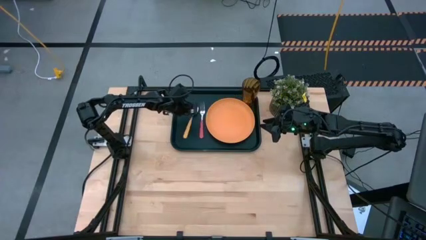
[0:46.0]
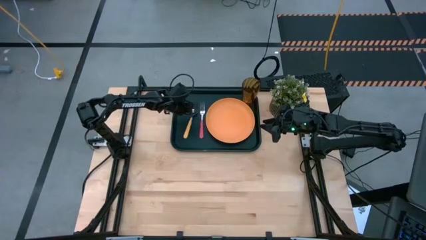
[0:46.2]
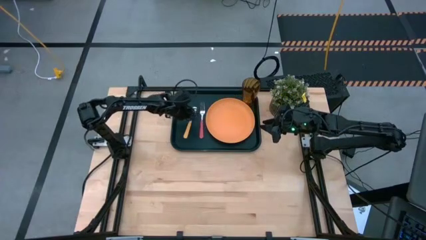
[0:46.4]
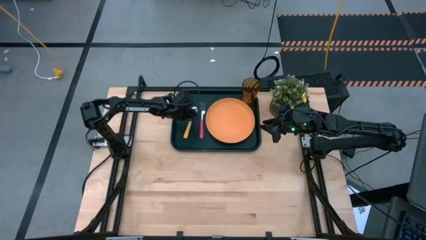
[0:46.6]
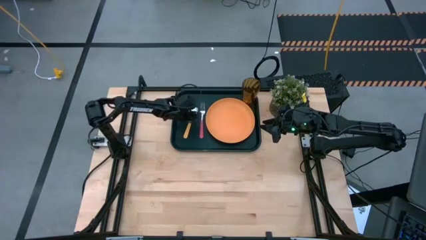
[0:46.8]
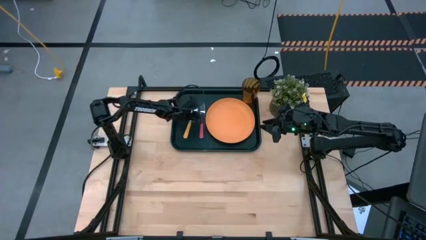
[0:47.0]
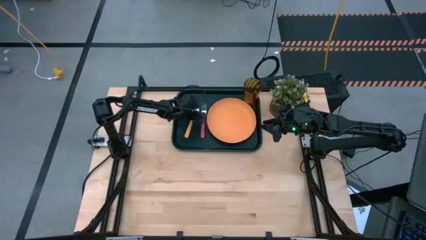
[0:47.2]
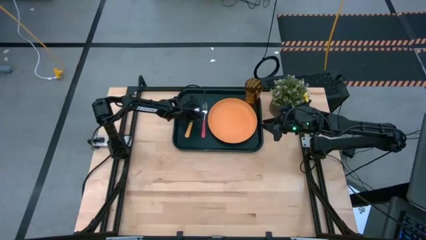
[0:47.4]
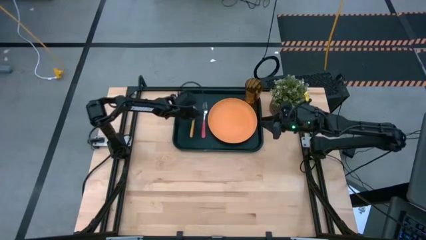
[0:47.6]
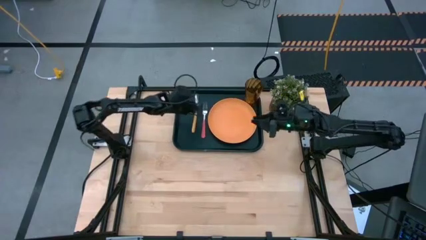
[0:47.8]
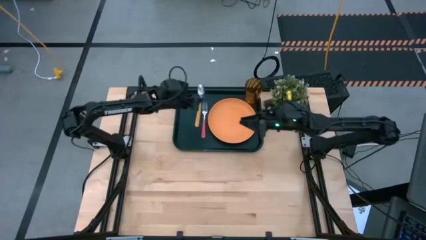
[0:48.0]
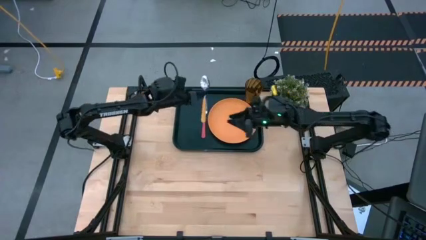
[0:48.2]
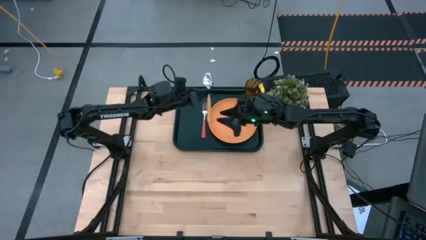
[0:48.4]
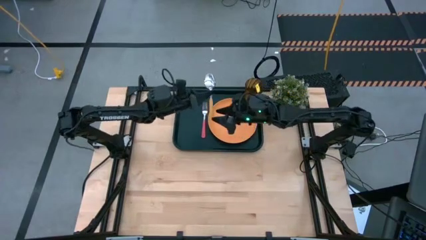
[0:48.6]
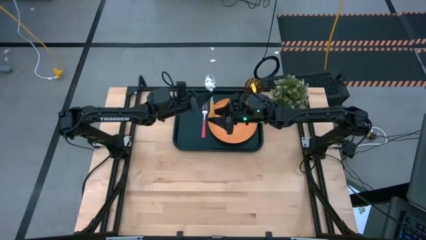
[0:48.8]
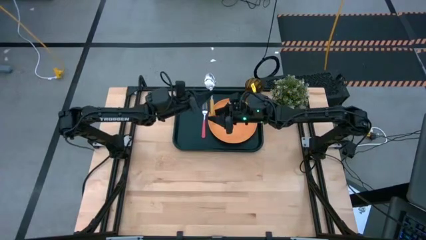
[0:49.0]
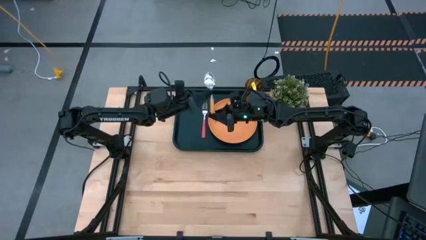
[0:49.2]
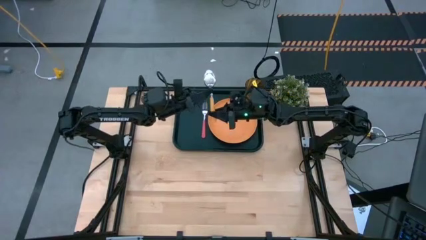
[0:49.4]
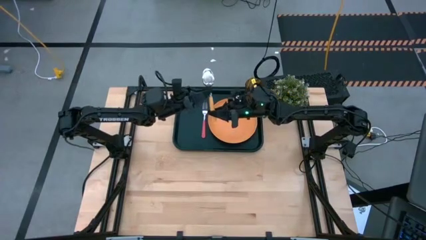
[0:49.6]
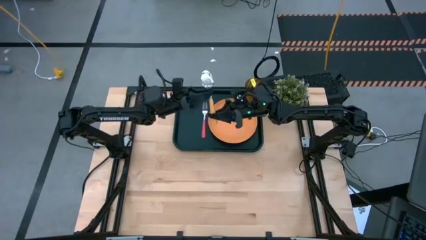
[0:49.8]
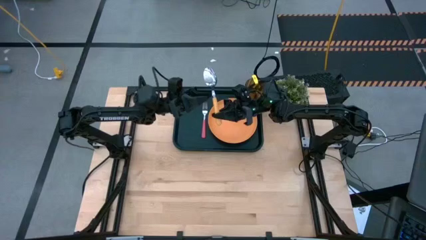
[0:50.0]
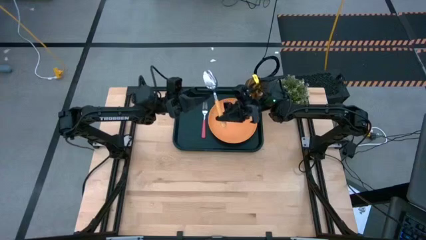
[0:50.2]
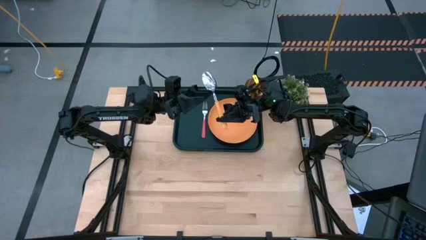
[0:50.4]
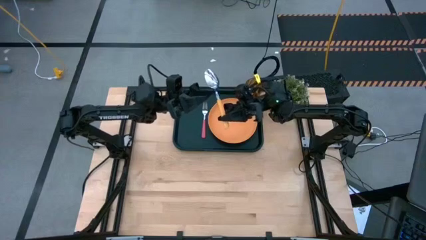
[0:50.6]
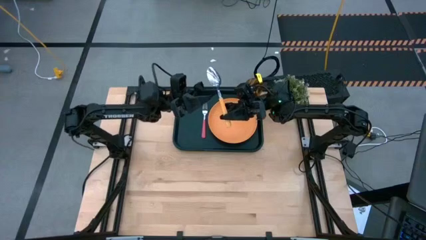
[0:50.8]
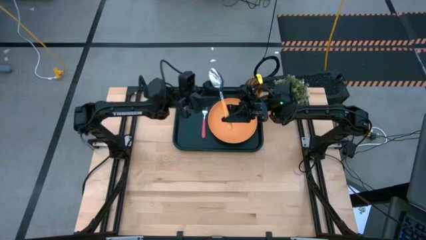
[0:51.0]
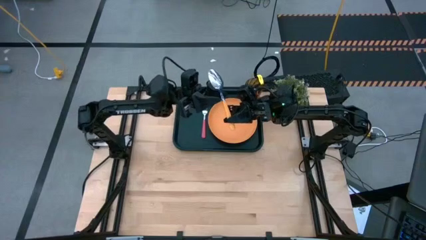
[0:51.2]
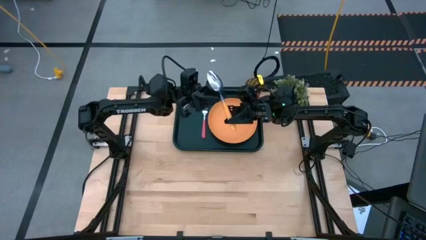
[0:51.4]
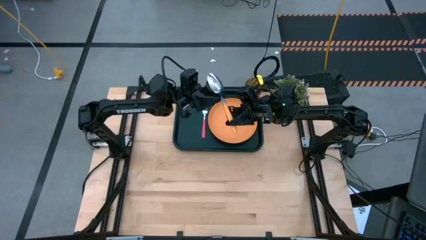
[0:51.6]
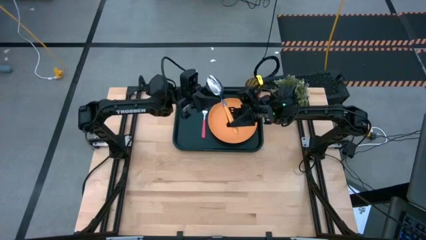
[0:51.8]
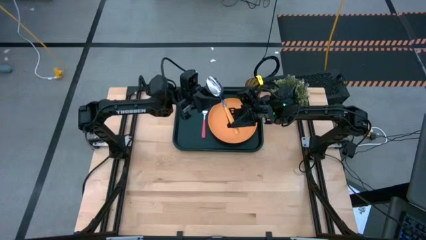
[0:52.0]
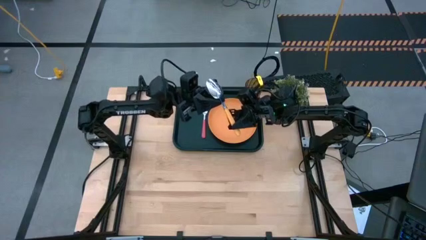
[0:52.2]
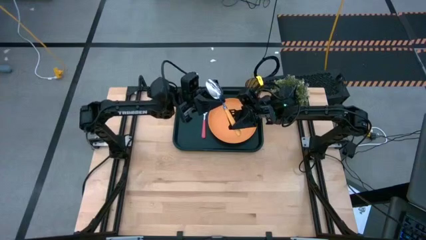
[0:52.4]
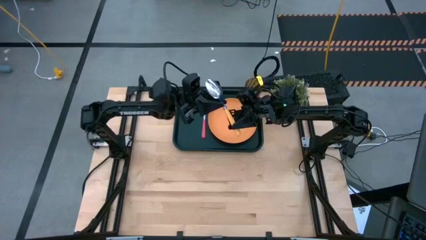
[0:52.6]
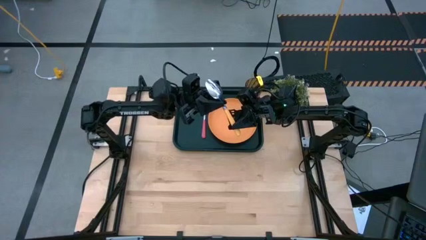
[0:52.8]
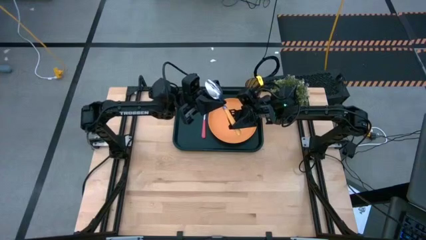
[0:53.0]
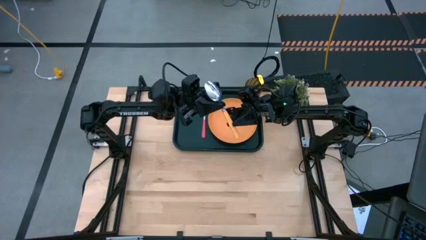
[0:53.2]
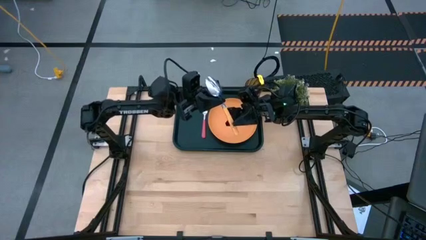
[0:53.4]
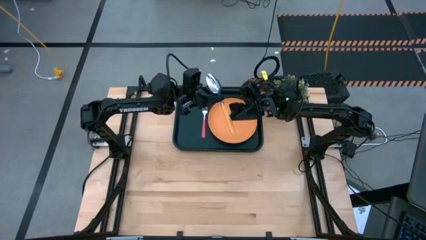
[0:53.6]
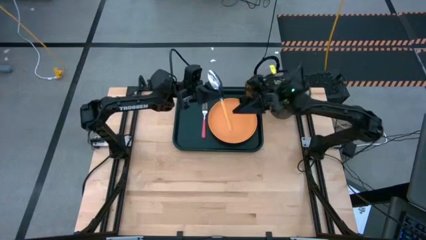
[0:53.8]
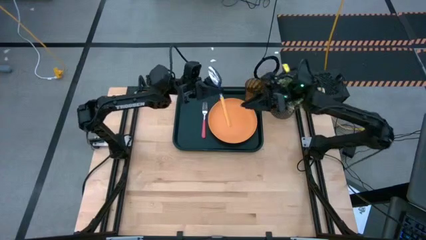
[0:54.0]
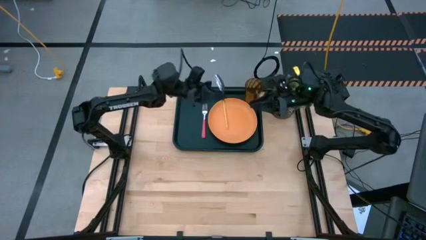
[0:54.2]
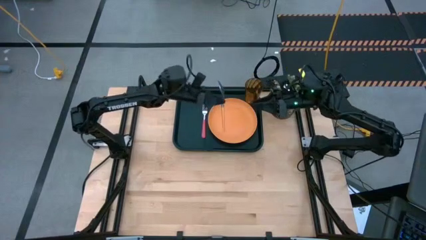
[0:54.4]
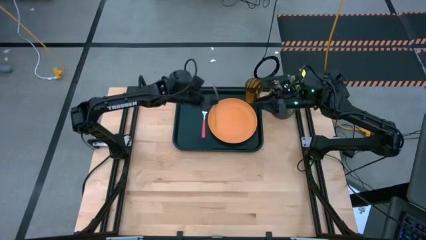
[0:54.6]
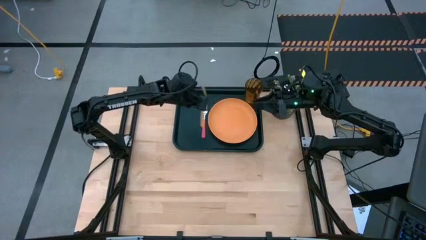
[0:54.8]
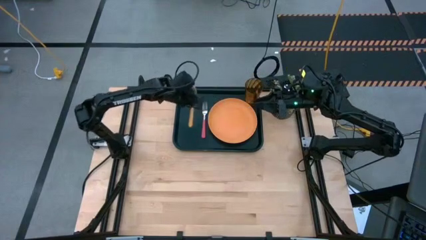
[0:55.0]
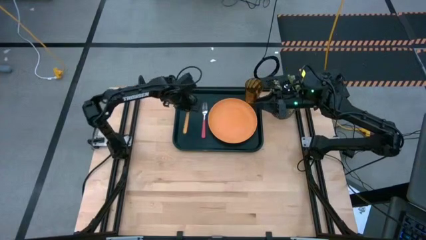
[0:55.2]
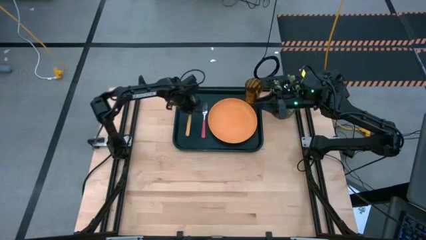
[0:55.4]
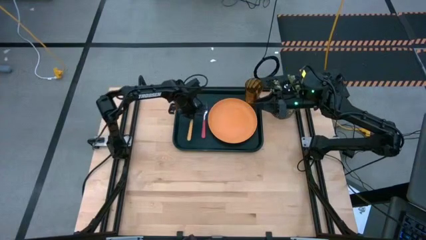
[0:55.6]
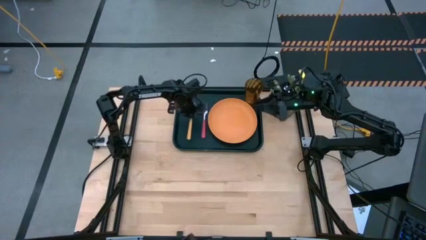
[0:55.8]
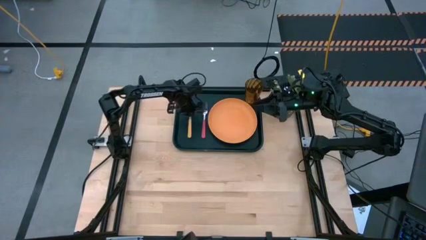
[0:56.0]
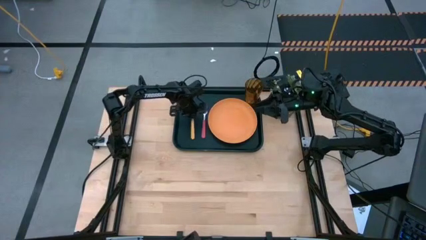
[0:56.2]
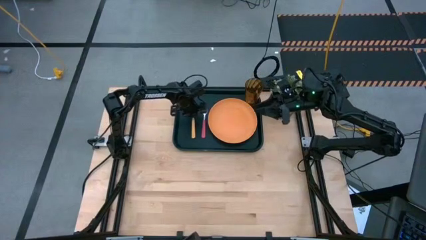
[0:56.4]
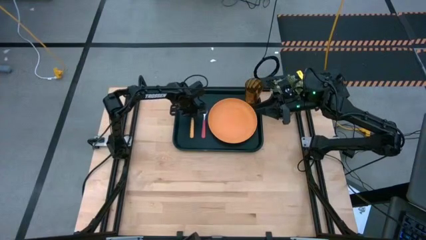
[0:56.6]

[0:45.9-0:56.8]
Task: Pick and place plate/cup/fork/spoon on tray
Put the orange spoon to the left of the pink fork on the black tray

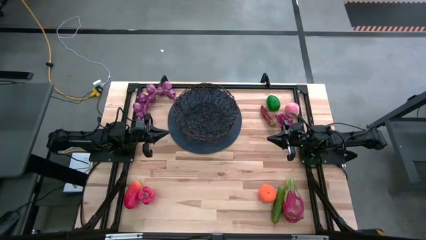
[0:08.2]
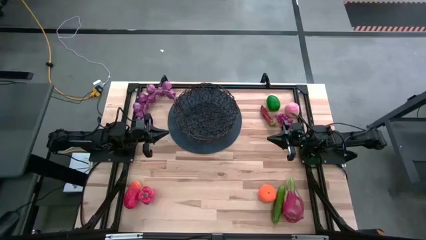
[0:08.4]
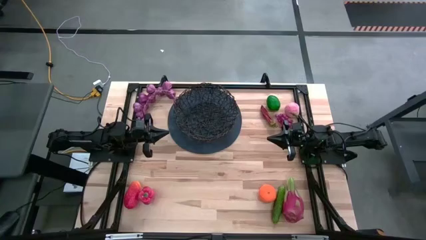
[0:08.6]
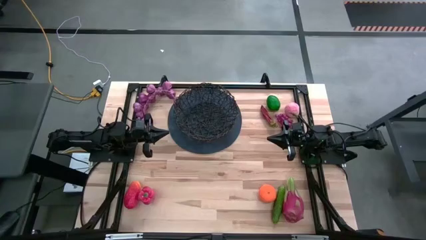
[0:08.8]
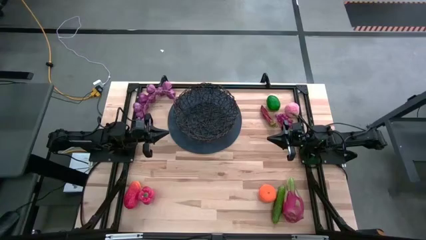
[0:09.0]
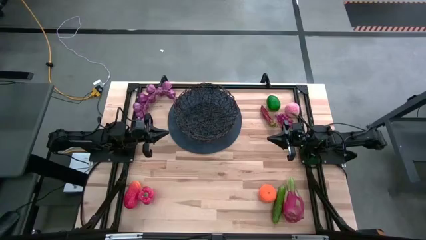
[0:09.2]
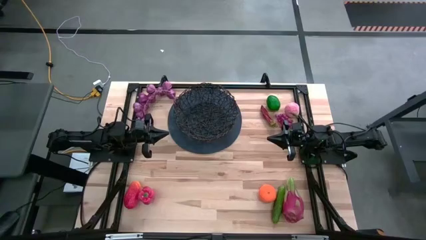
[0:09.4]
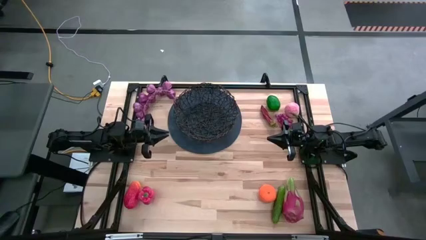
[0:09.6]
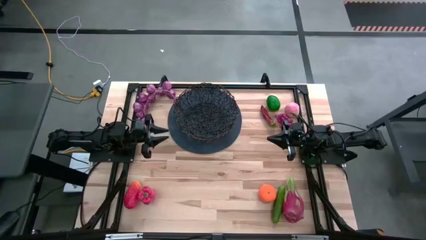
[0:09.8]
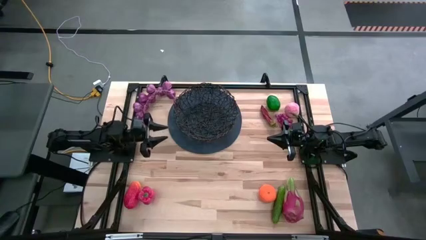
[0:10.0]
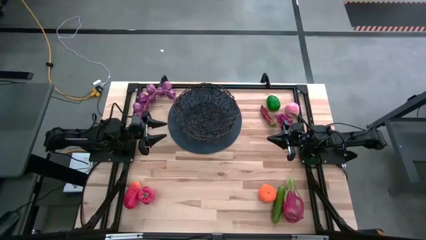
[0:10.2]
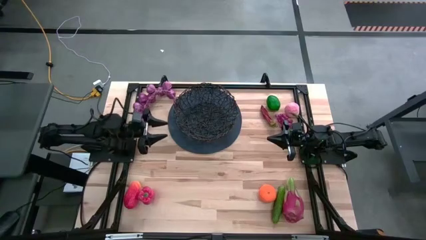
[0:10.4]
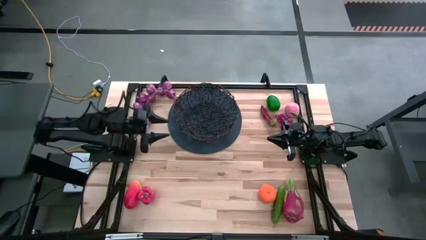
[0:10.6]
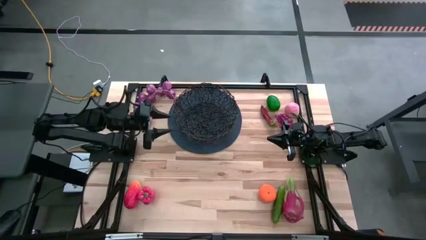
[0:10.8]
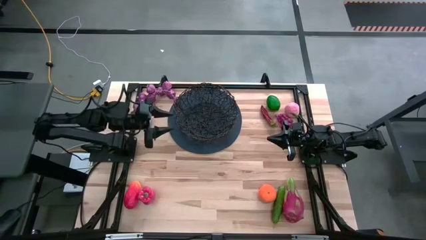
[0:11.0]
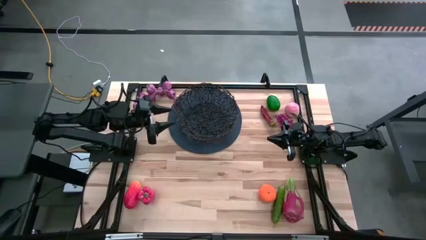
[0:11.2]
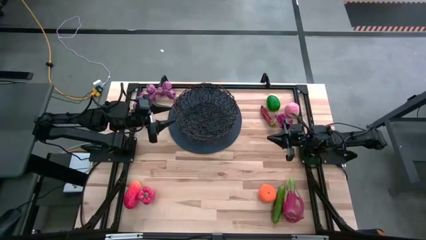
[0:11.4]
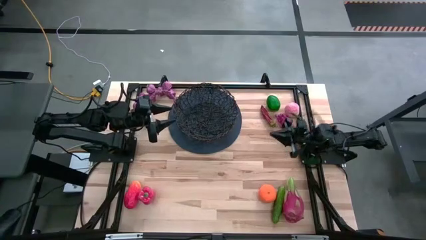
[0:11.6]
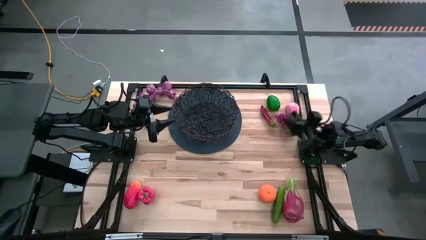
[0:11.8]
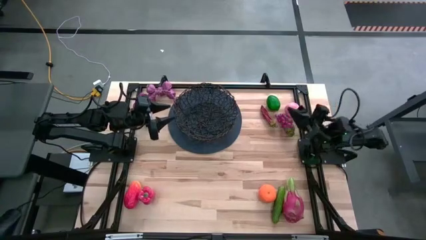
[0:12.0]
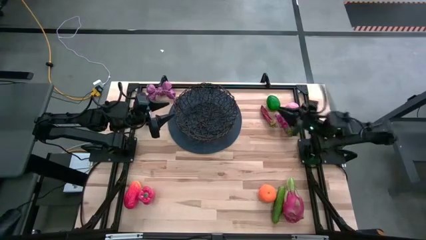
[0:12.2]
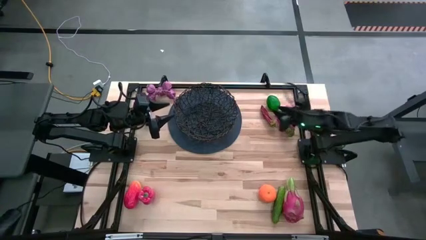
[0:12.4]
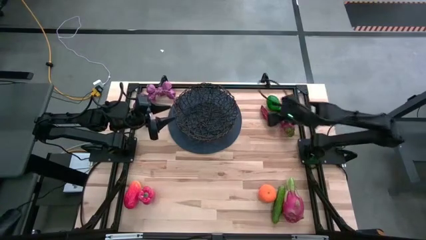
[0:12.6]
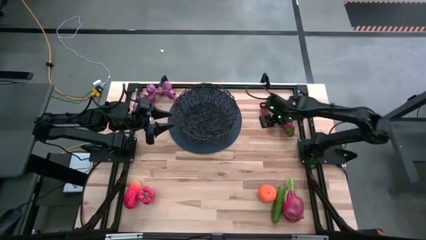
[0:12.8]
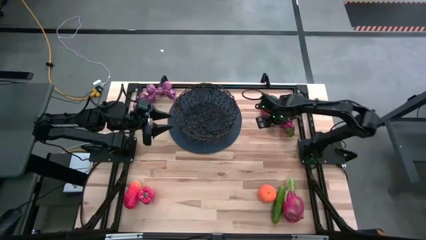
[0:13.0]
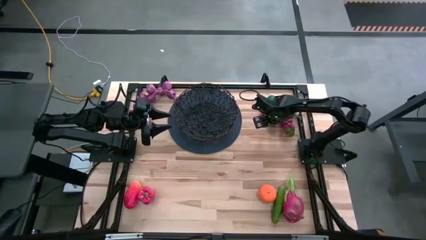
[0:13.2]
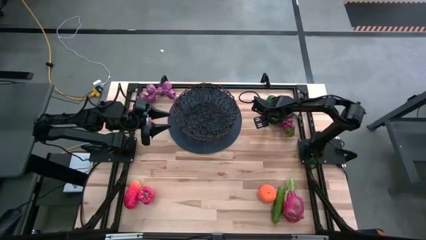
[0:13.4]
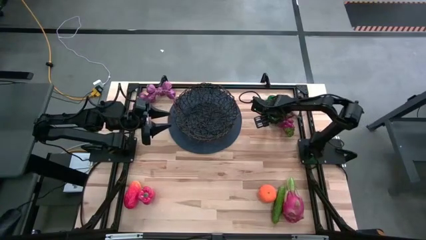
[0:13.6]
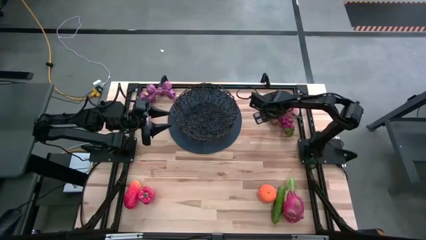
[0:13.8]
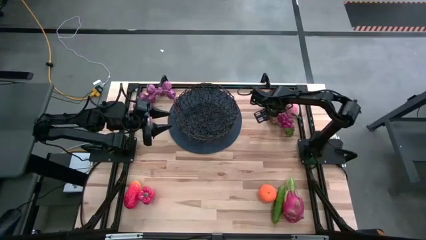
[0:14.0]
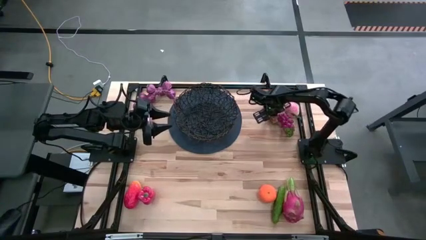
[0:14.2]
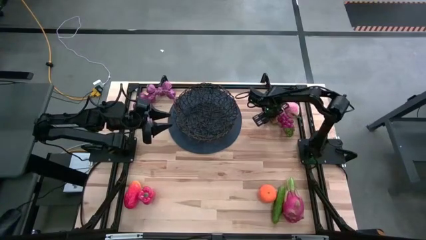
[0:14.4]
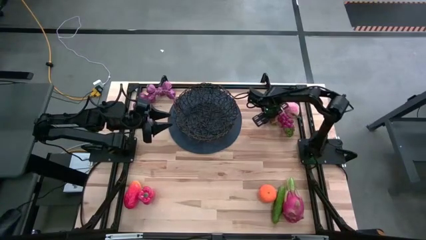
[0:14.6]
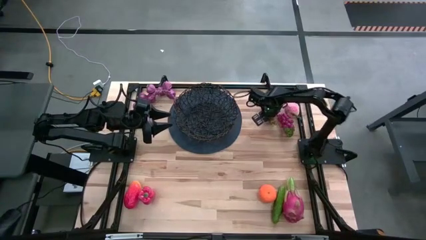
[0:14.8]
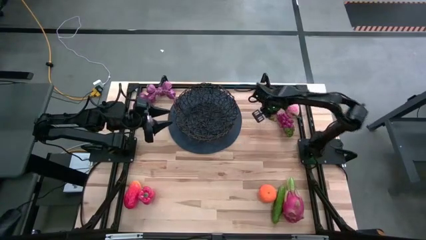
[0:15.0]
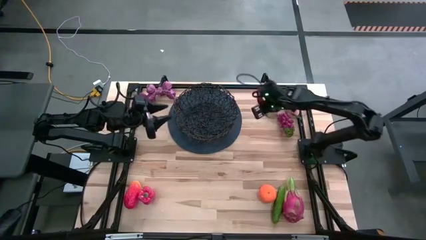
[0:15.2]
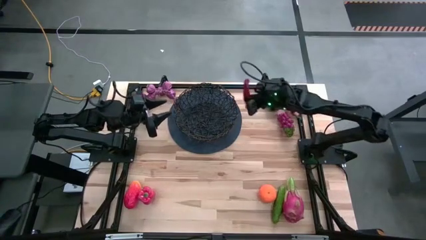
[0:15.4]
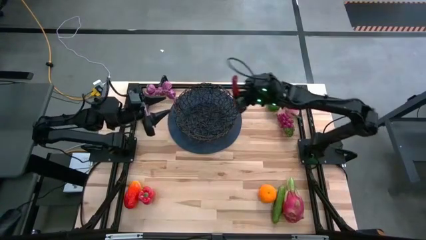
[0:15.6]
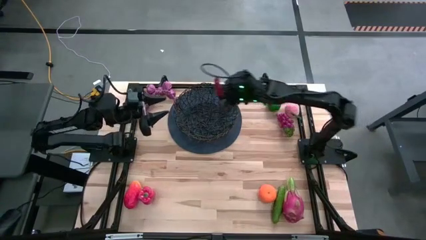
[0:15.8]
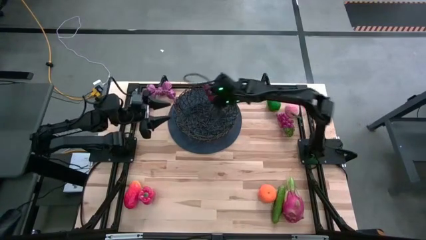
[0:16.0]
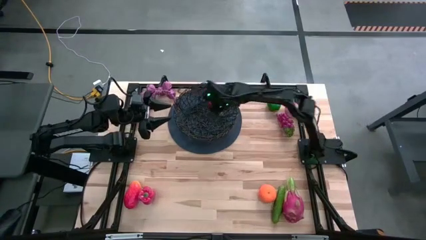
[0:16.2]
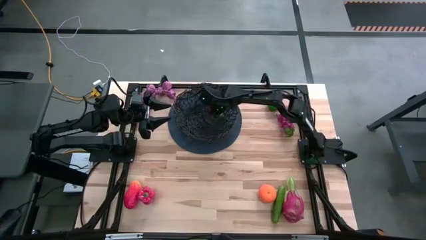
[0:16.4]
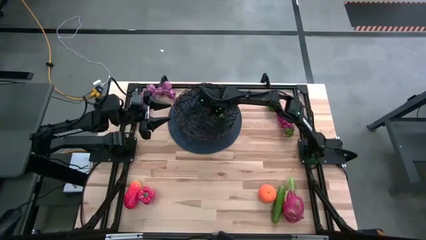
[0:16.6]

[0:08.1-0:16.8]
Task: Build produce basket
Put the red chili pepper into the wire basket
